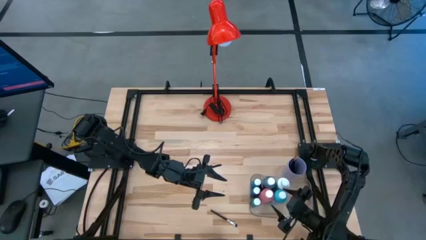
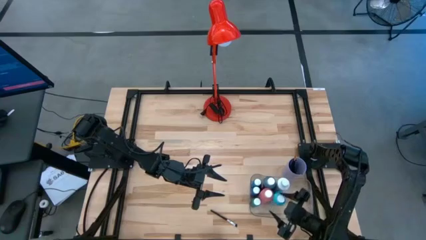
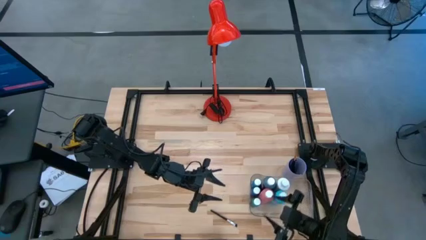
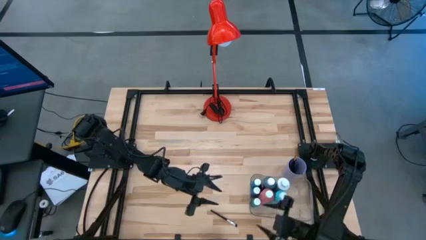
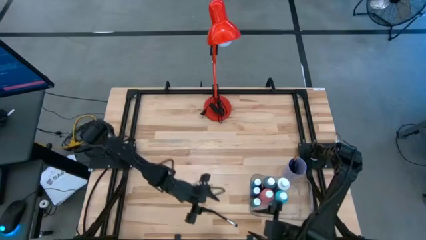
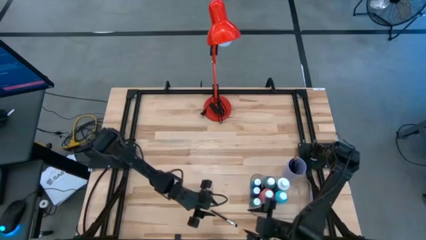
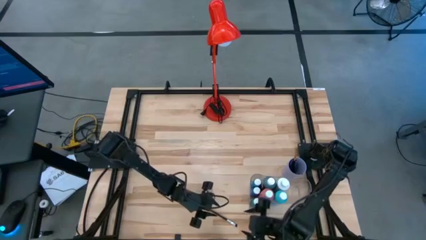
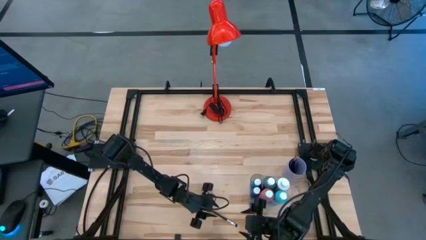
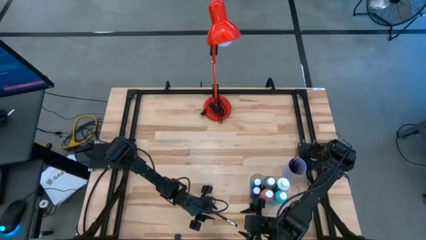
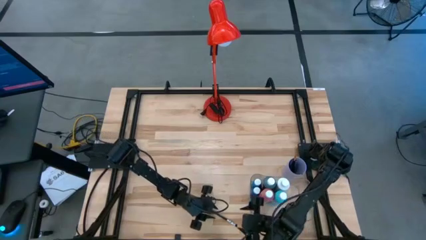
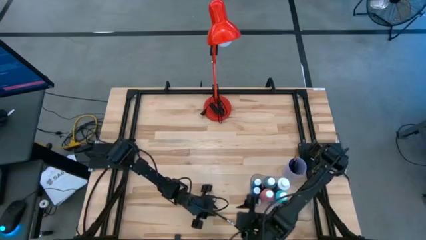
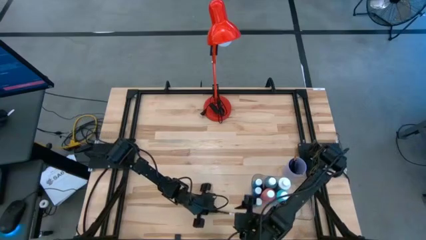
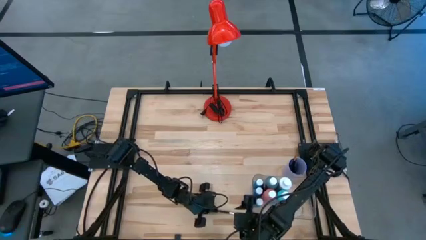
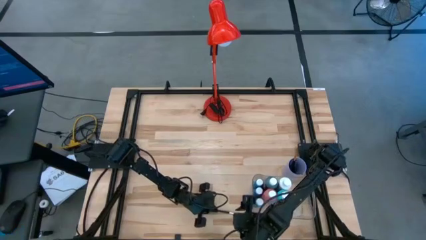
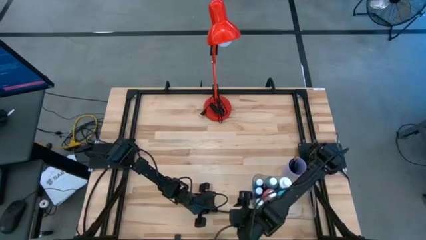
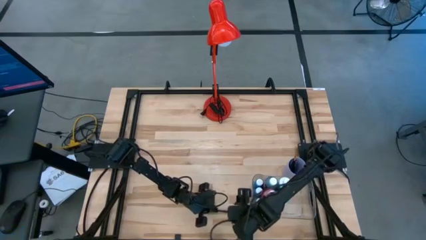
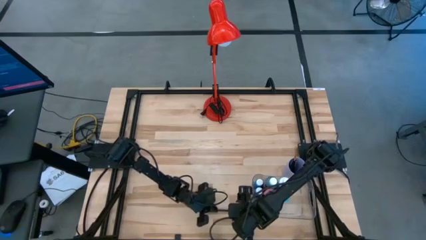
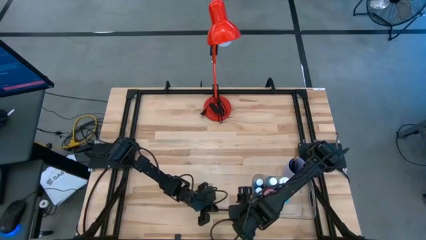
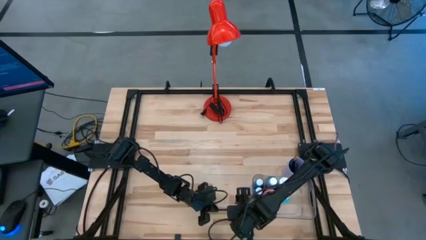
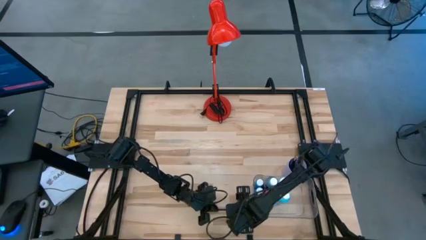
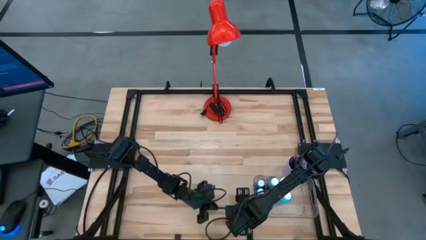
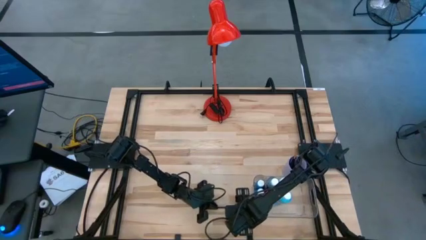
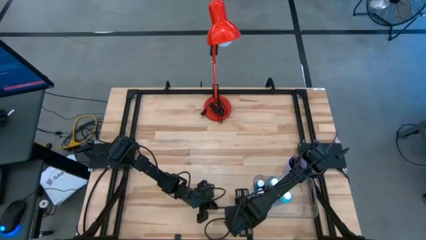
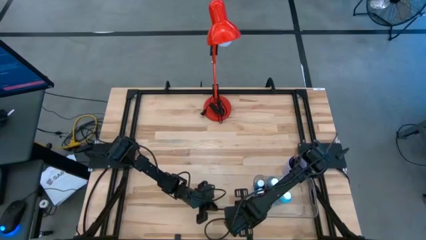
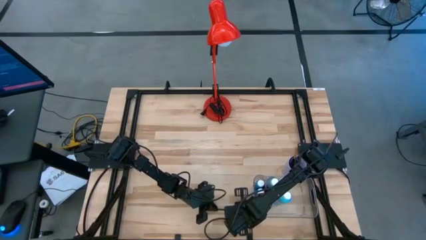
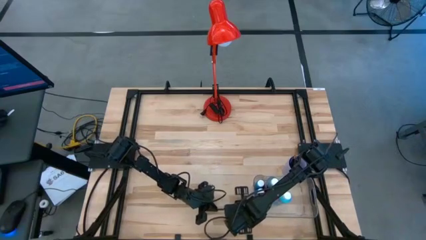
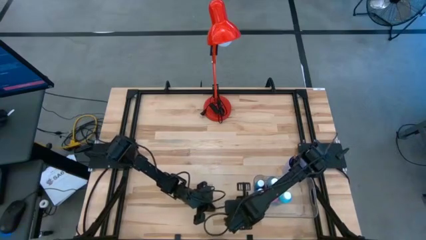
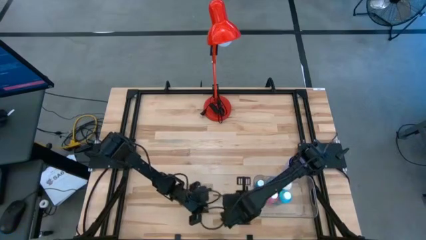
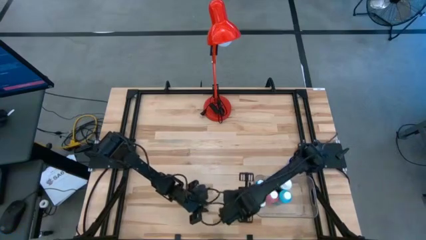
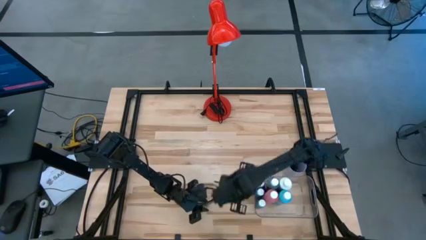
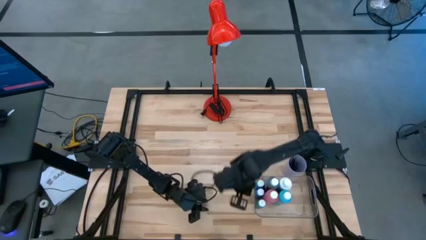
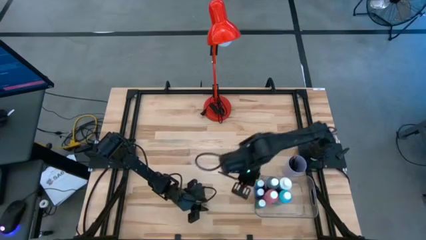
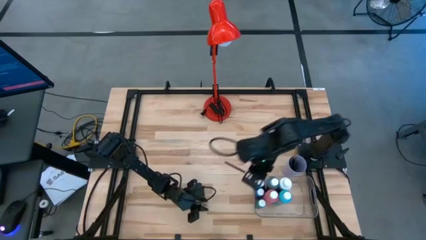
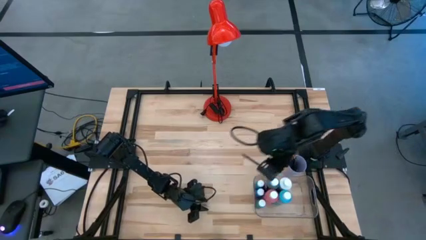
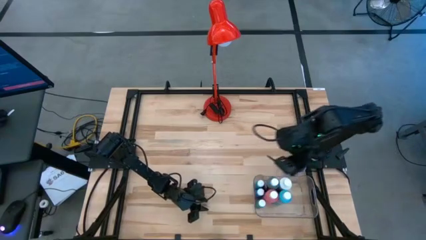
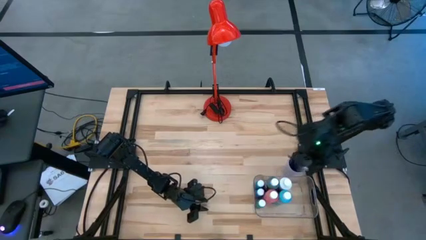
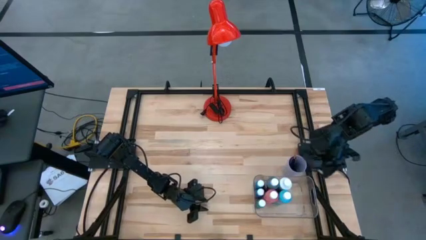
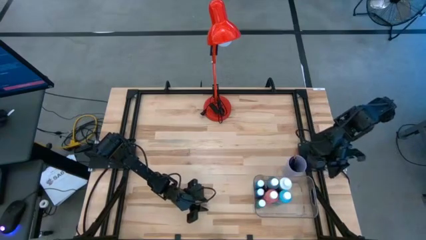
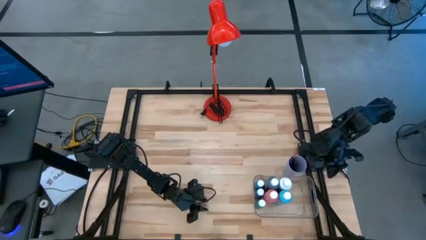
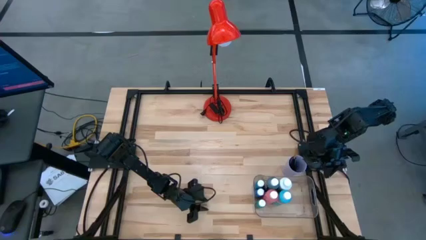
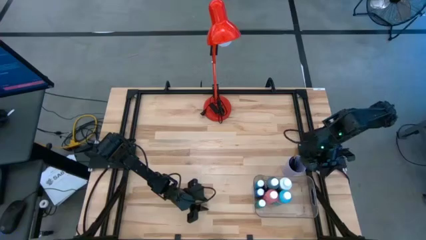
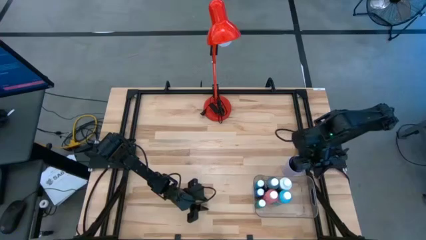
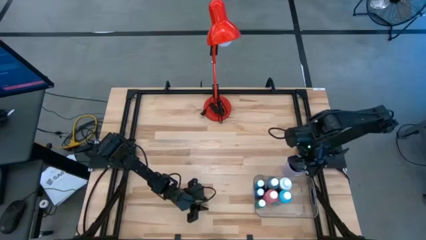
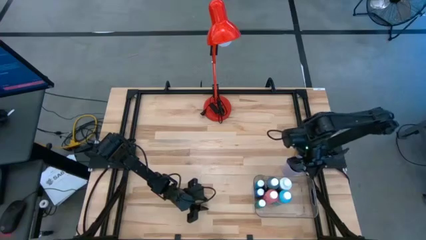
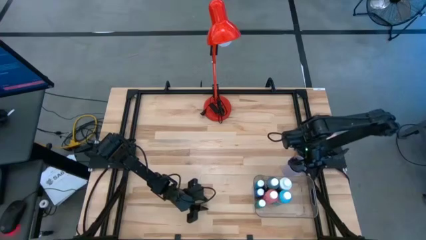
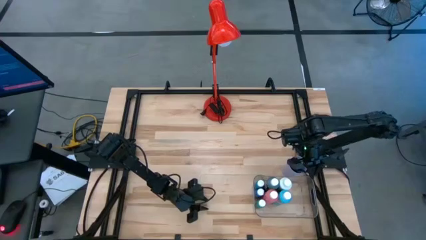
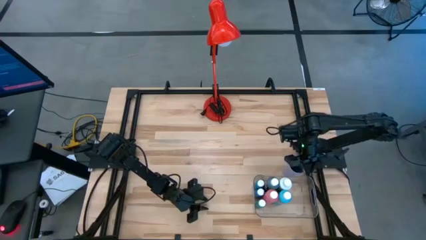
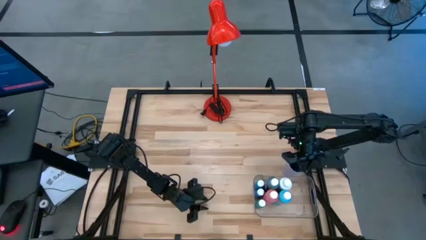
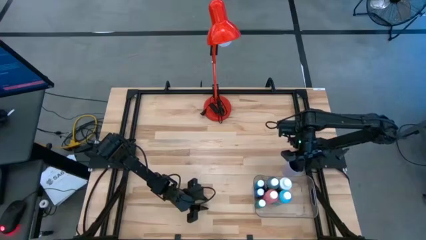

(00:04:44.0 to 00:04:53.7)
Task: Pick & Place Paint Supplies
Put the black silver paint brush into the purple cup

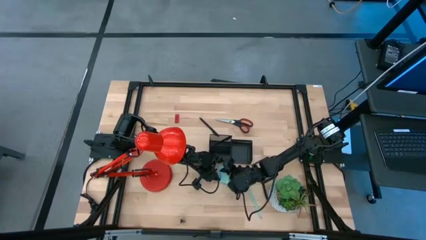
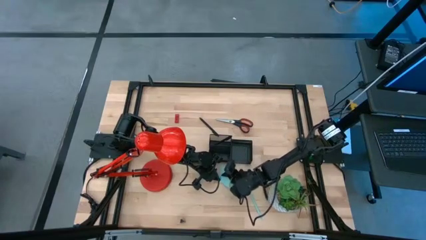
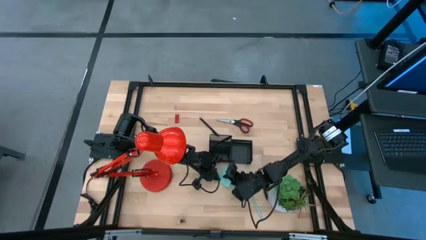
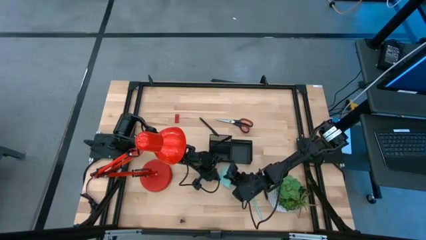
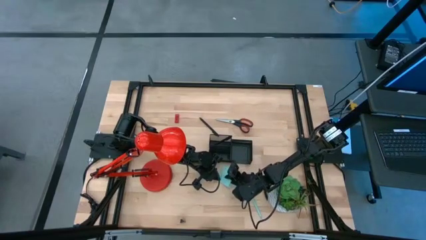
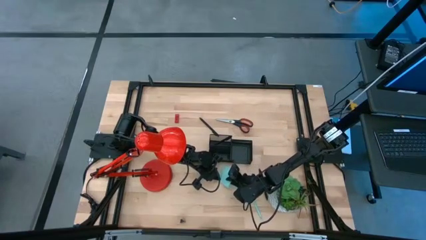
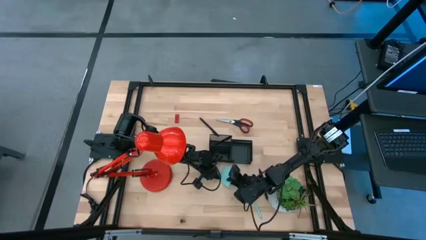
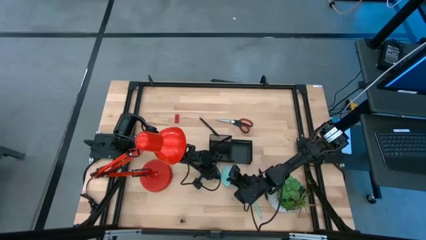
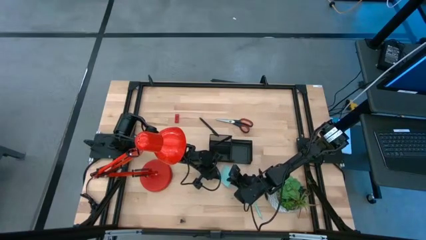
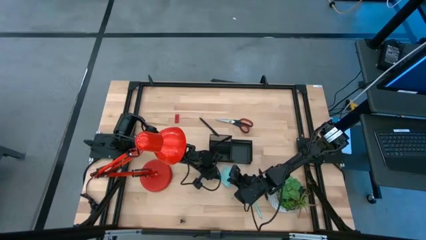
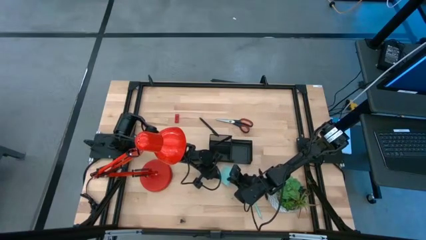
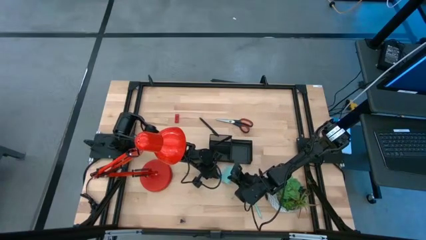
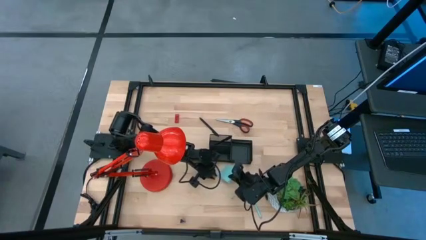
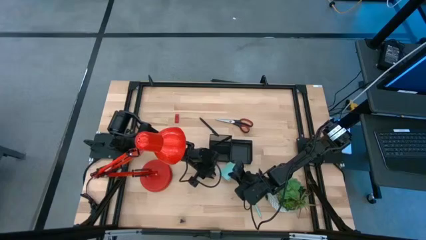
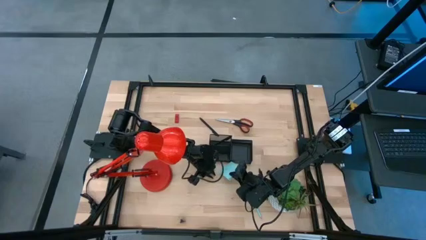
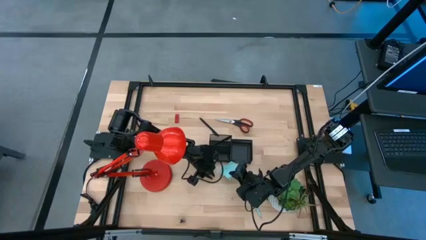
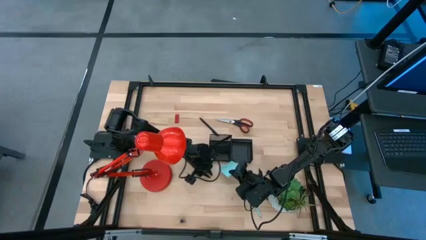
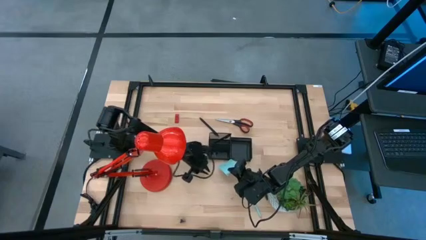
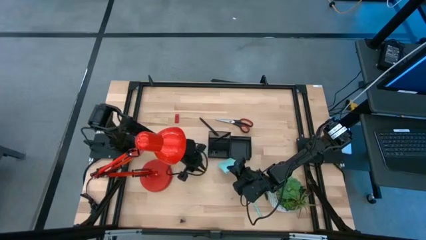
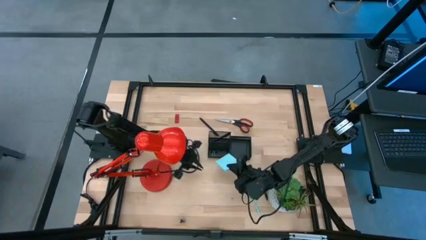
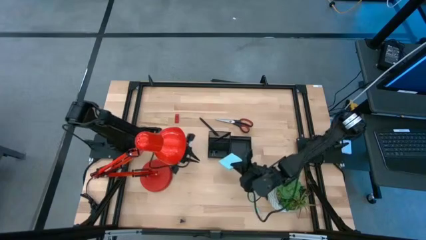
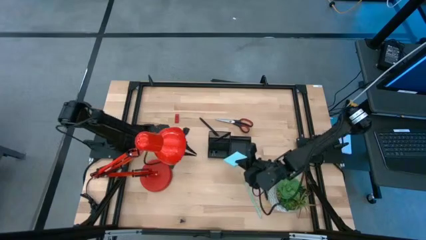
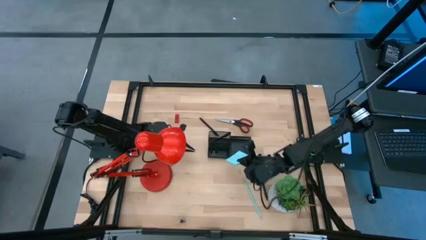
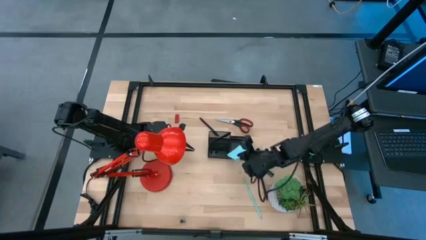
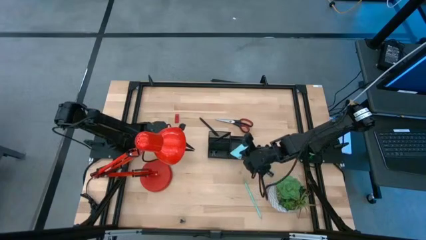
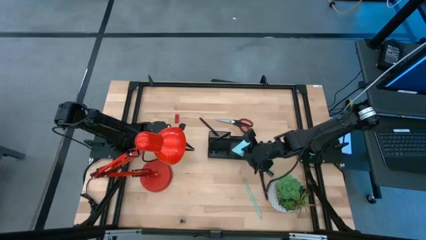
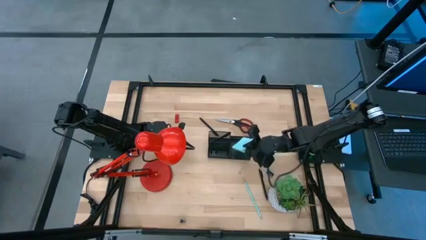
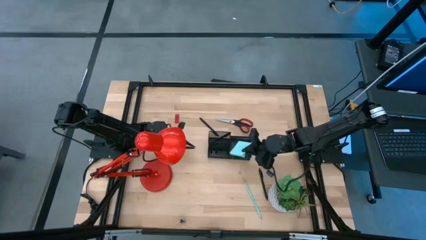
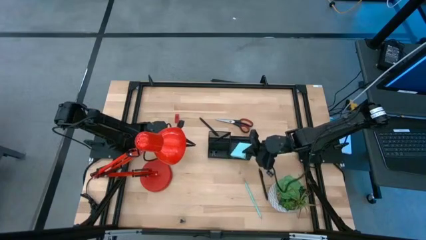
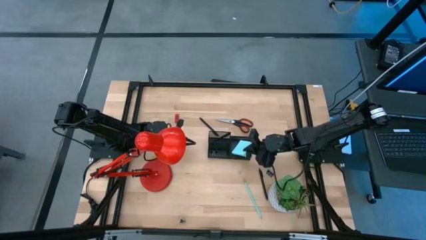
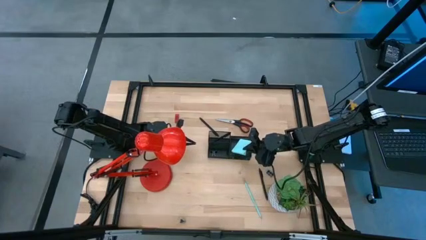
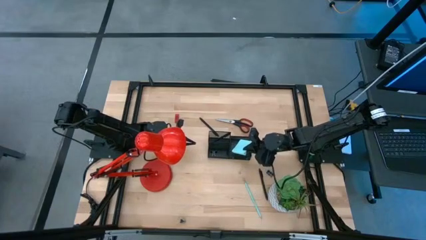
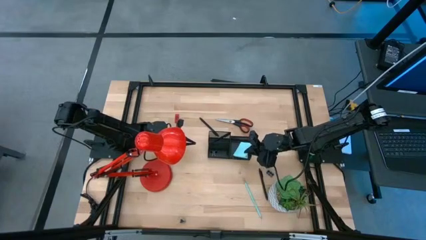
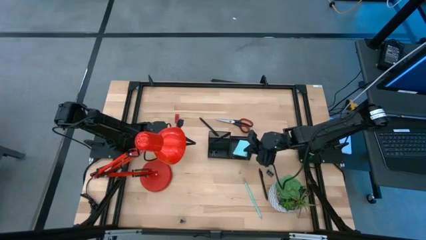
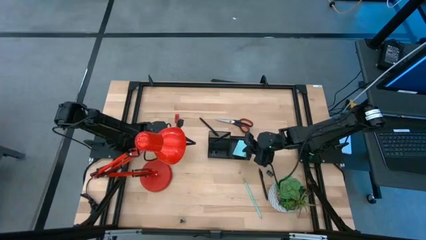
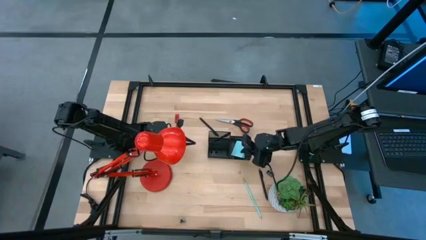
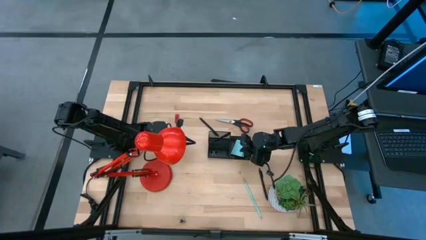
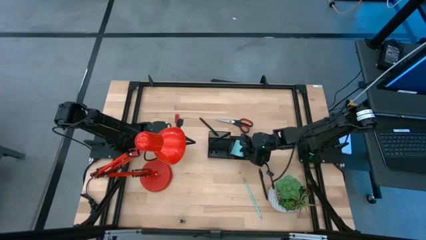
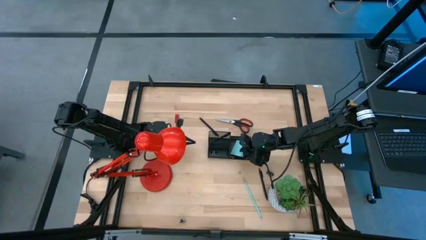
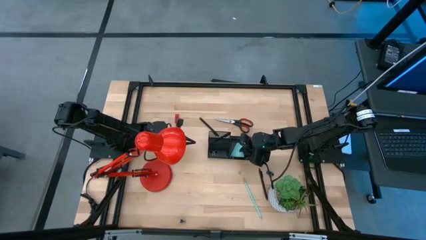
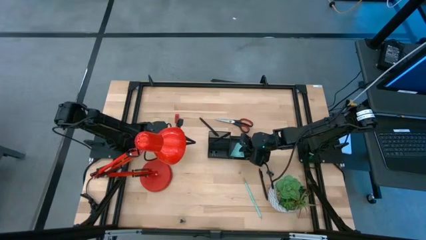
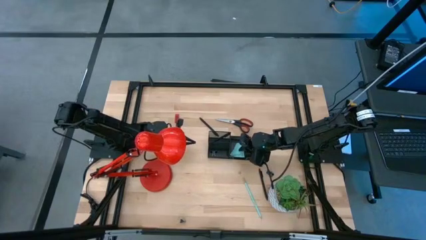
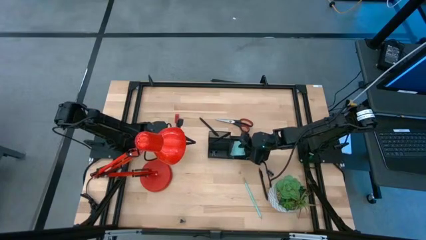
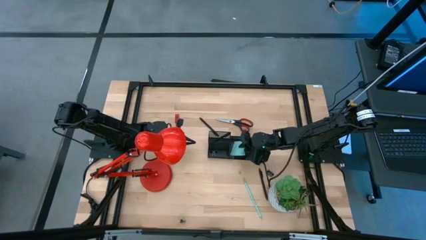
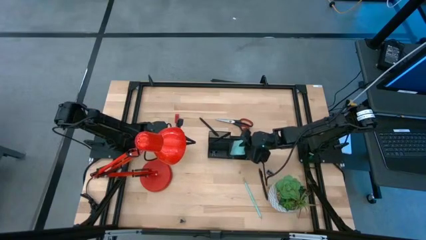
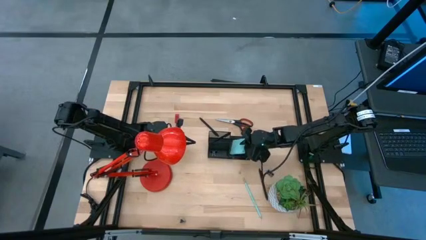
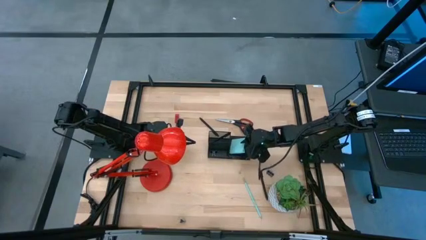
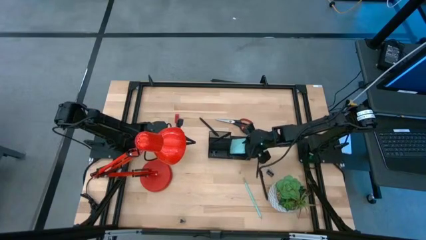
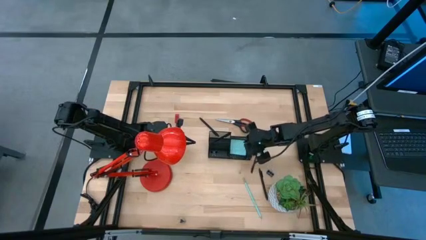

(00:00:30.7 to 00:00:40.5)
Task: Pick and place office supplies into organizer
Put the light blue sticky notes into the black desk organizer
